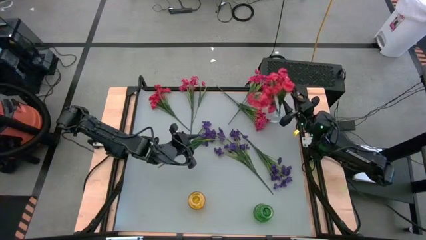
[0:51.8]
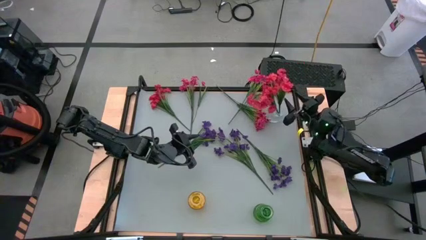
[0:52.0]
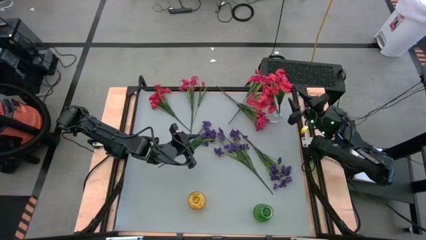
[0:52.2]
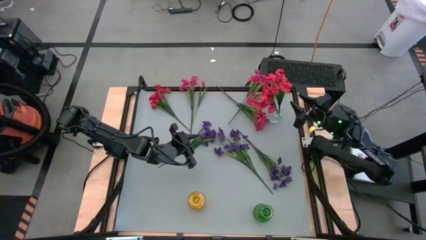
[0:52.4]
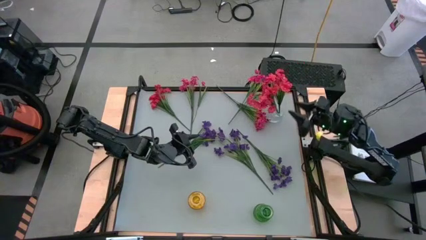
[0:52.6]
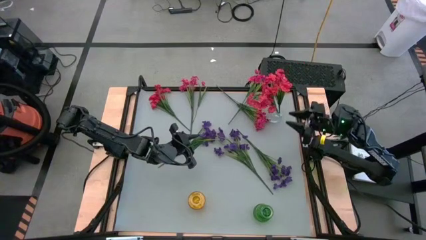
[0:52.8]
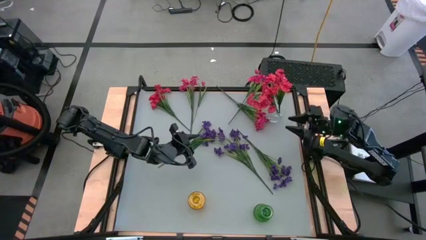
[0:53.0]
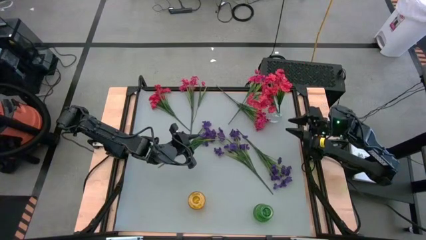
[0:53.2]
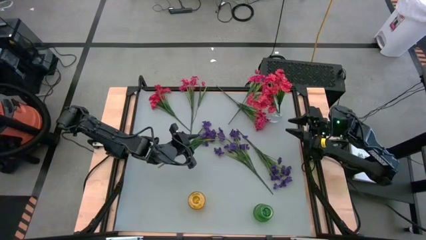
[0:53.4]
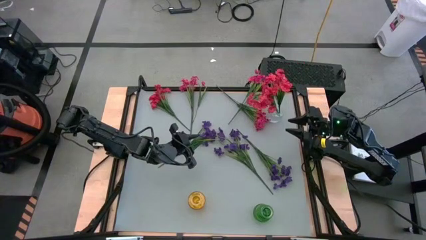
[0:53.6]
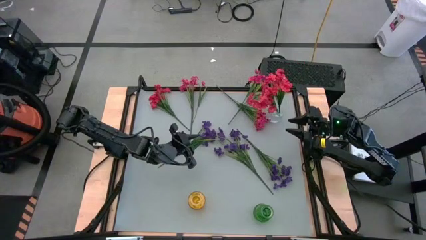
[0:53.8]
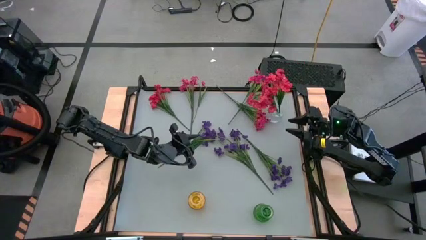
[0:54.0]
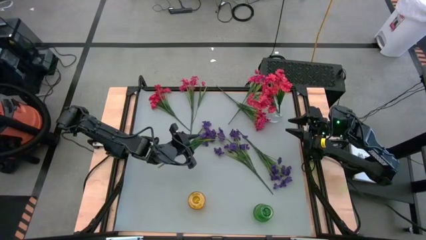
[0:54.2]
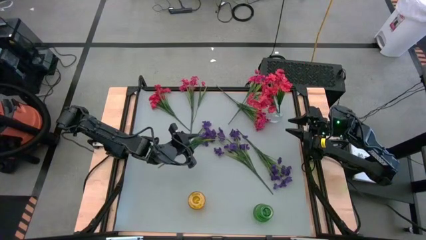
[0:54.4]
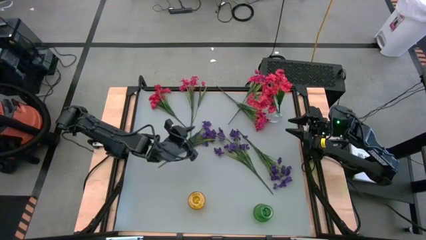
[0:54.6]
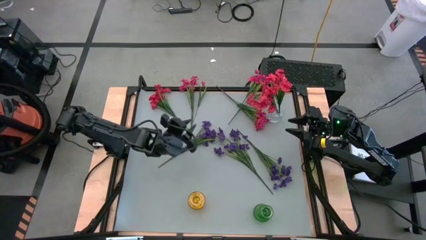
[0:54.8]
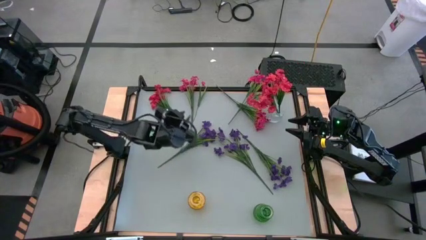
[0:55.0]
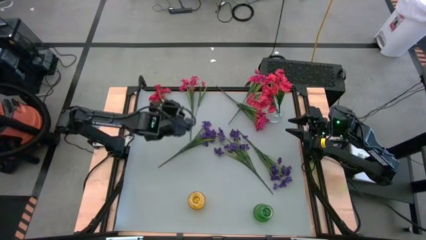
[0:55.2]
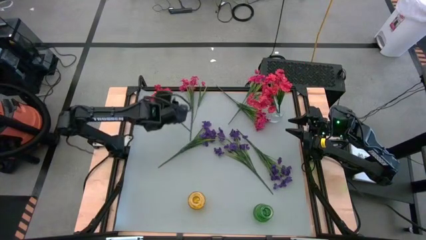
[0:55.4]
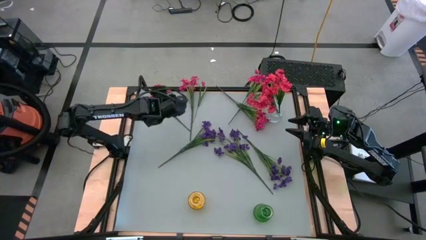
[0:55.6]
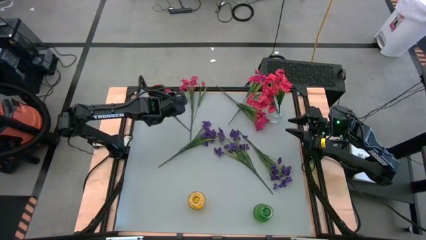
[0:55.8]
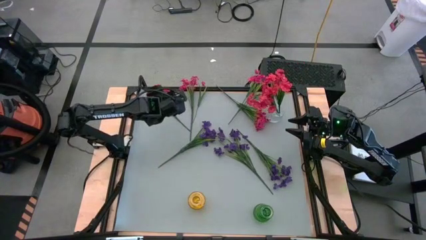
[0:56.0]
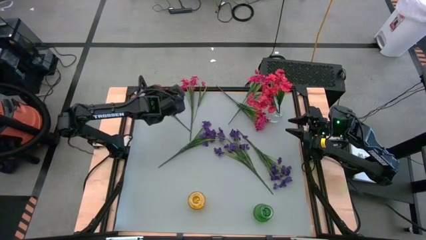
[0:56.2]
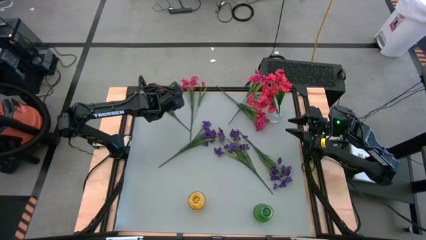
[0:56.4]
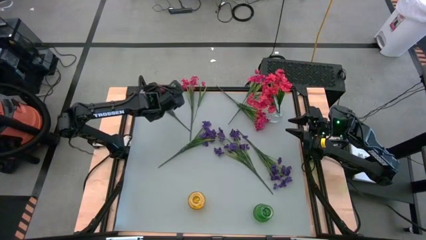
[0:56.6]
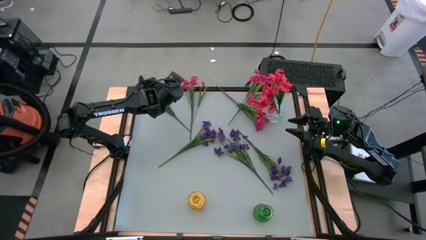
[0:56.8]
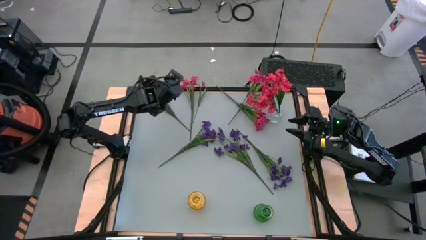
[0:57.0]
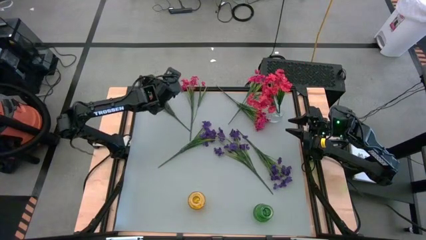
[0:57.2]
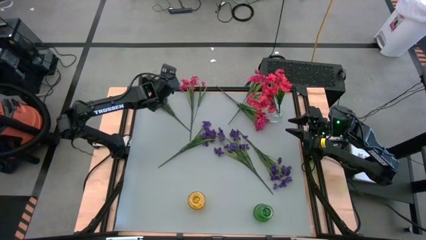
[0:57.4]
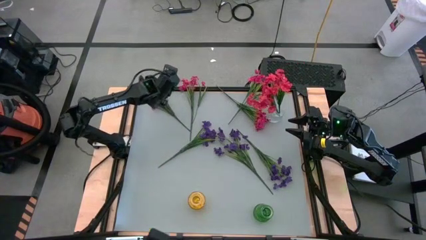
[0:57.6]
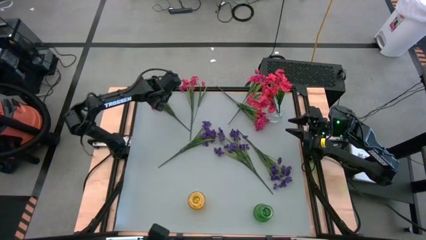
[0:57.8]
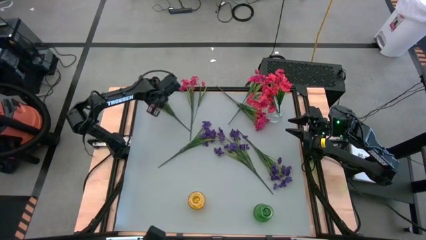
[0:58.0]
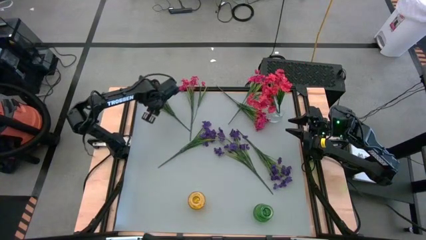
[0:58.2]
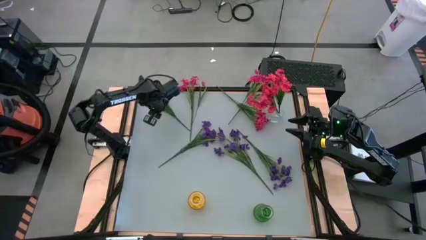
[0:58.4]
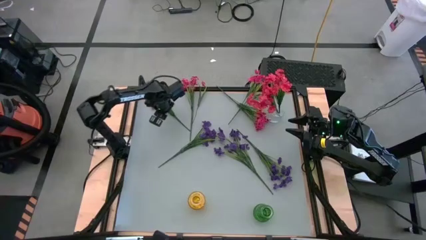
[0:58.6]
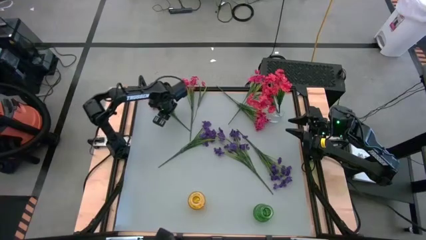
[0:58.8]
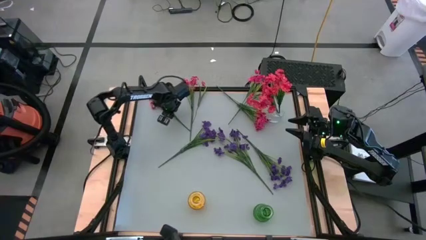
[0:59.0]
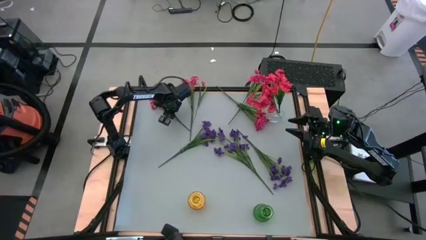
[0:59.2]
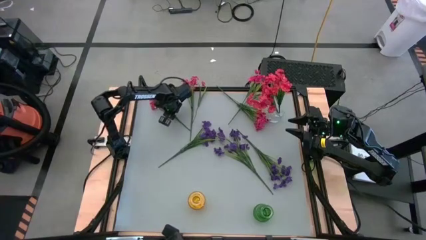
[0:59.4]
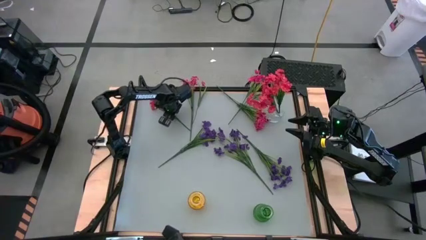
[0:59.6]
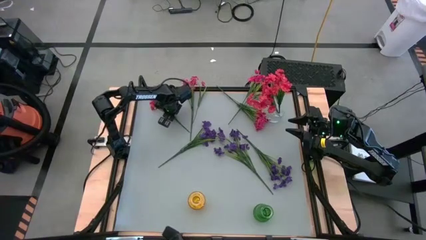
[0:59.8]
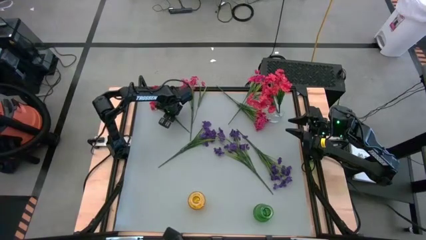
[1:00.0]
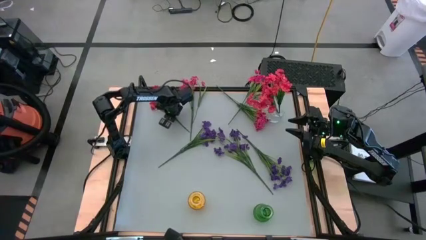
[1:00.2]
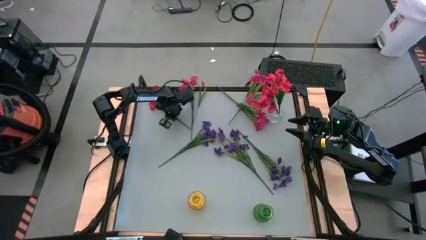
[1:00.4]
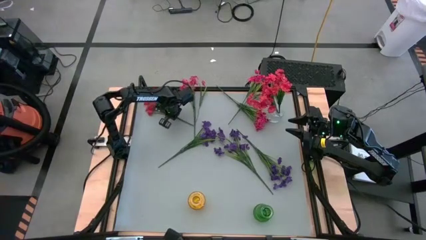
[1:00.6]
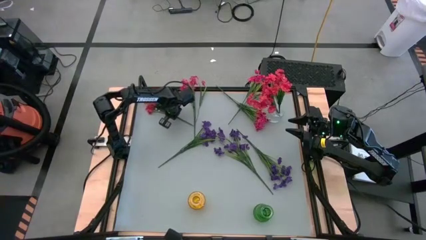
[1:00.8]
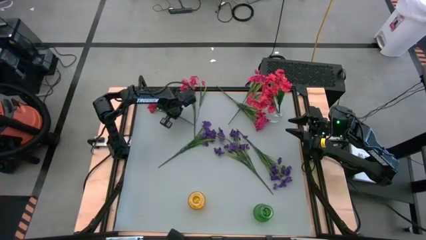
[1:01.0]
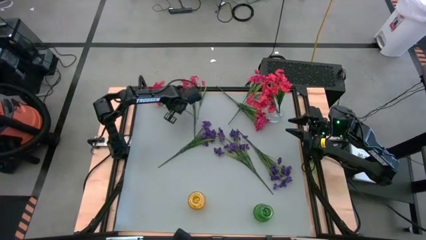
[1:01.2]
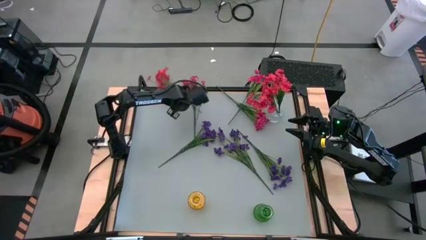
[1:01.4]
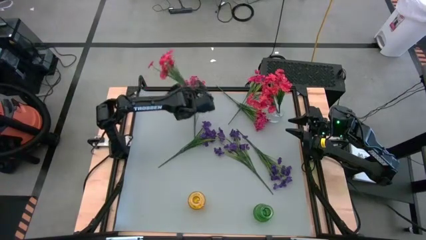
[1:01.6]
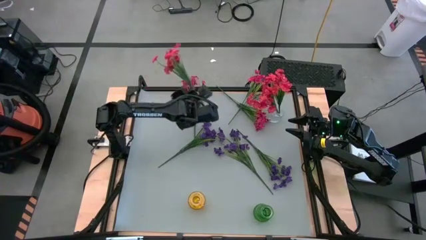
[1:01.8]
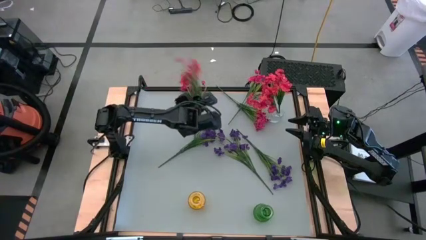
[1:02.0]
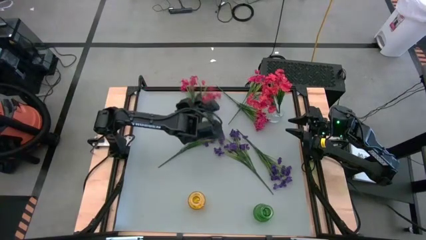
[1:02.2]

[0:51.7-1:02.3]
Task: Sort flowers into vase by color
Put the red flower into the transparent vase

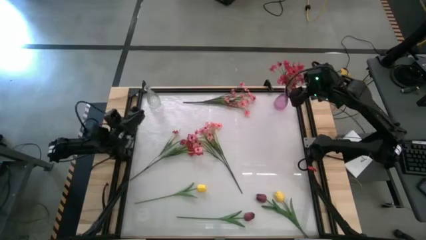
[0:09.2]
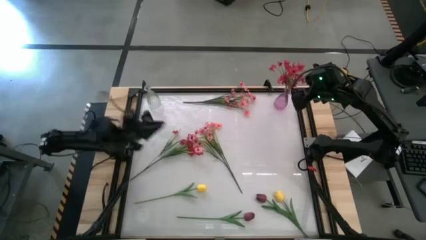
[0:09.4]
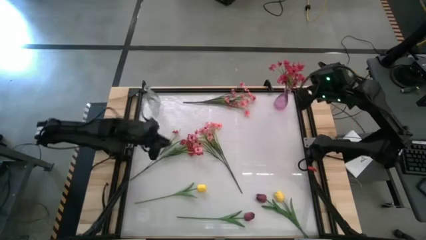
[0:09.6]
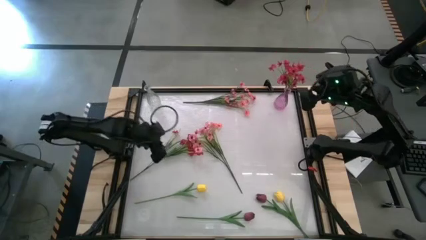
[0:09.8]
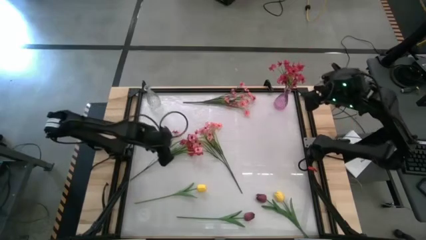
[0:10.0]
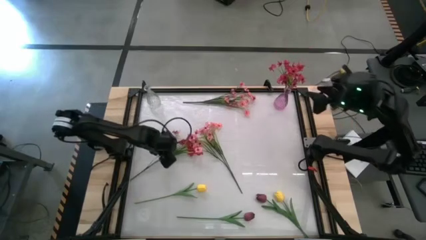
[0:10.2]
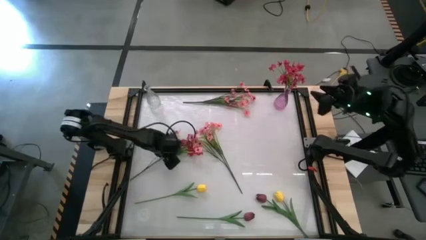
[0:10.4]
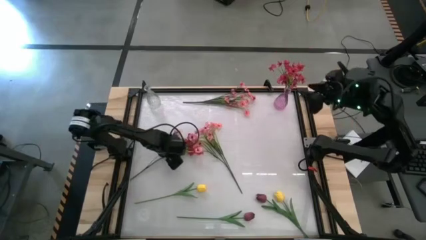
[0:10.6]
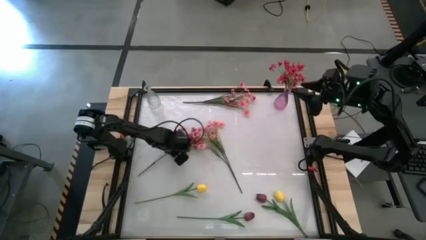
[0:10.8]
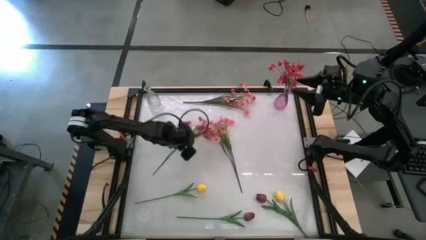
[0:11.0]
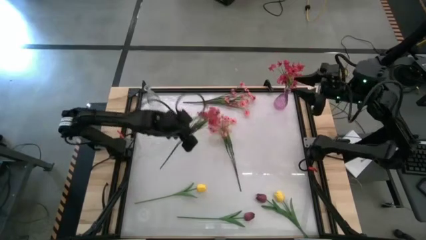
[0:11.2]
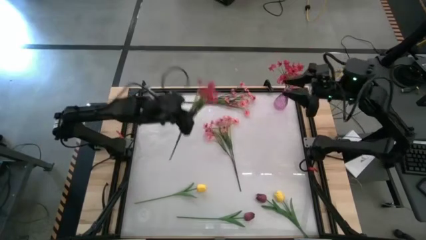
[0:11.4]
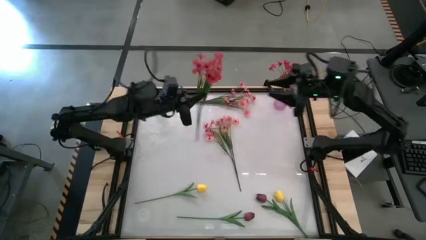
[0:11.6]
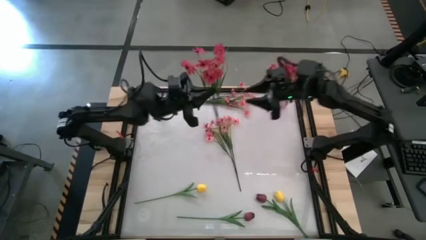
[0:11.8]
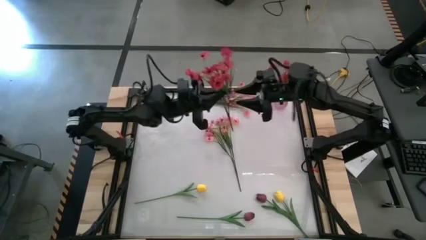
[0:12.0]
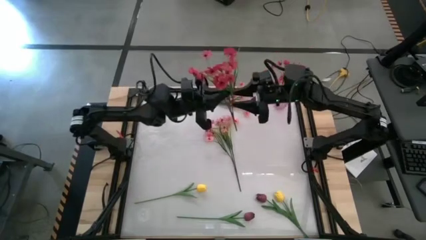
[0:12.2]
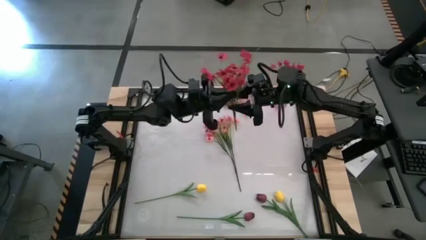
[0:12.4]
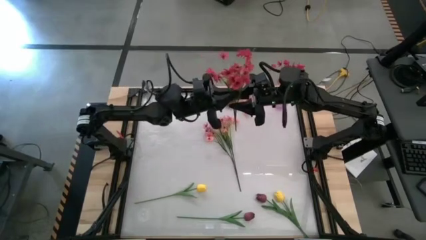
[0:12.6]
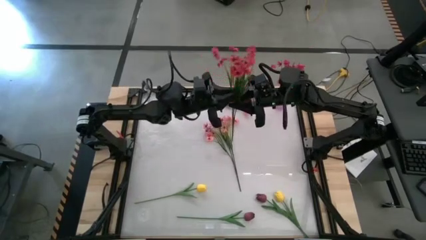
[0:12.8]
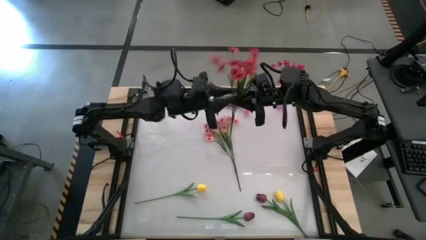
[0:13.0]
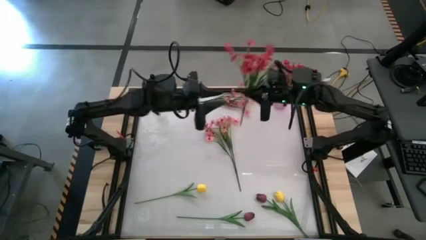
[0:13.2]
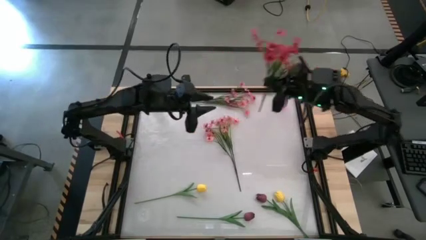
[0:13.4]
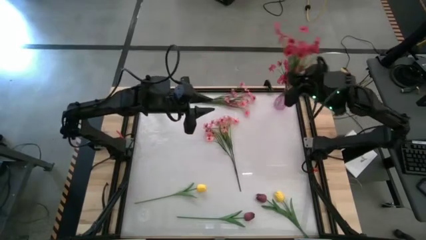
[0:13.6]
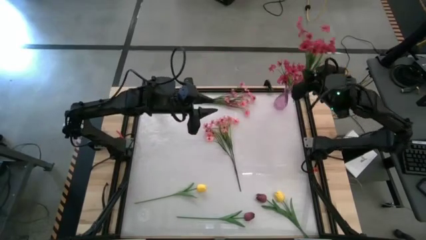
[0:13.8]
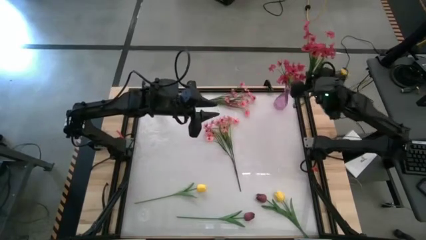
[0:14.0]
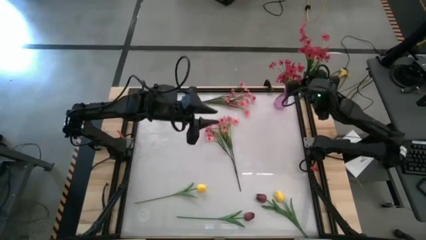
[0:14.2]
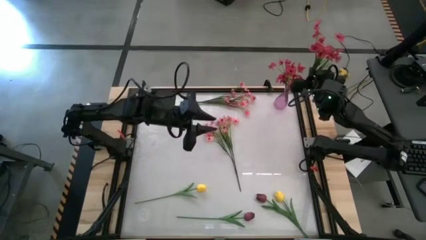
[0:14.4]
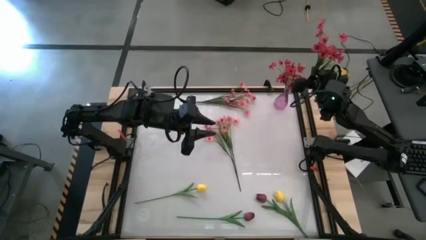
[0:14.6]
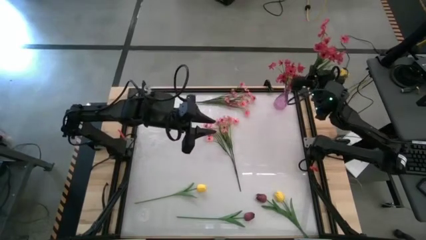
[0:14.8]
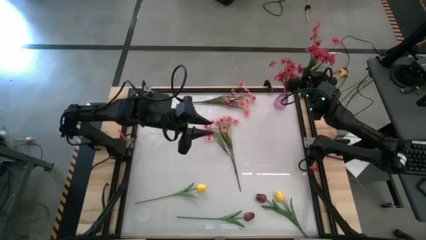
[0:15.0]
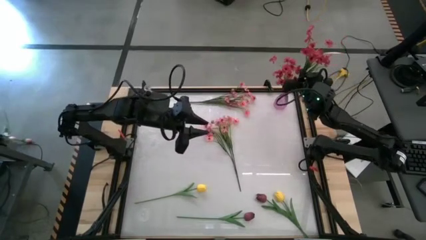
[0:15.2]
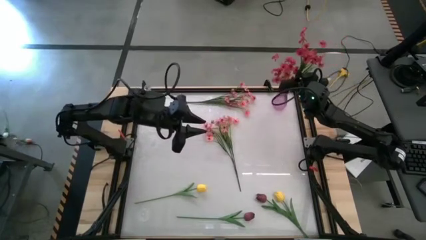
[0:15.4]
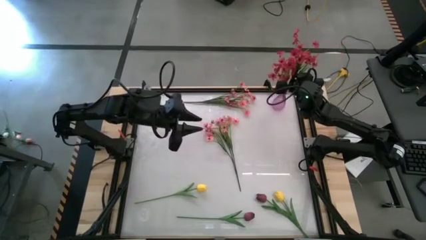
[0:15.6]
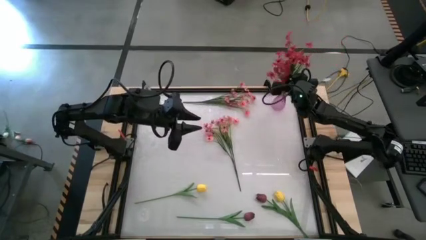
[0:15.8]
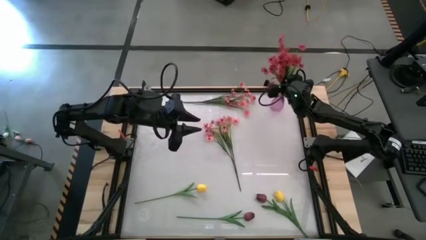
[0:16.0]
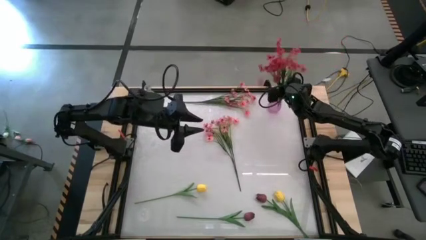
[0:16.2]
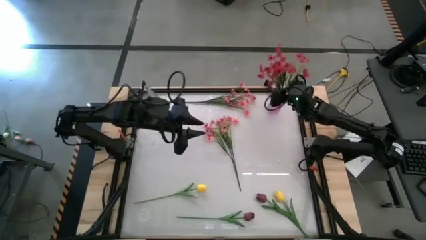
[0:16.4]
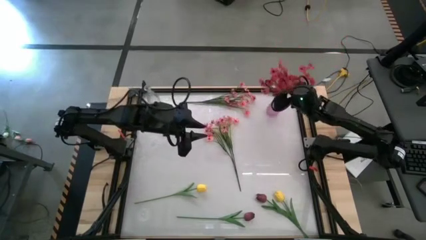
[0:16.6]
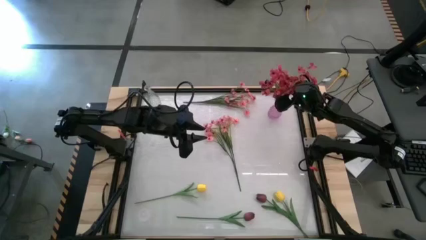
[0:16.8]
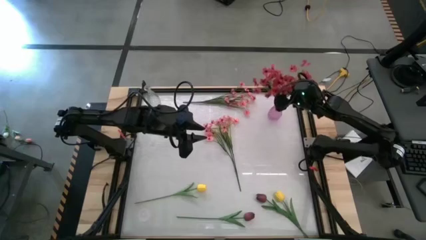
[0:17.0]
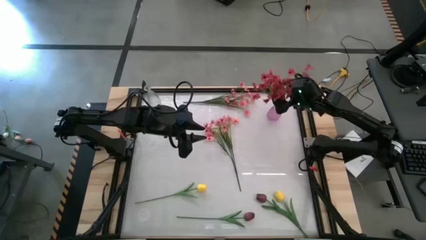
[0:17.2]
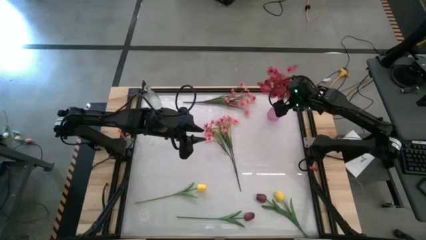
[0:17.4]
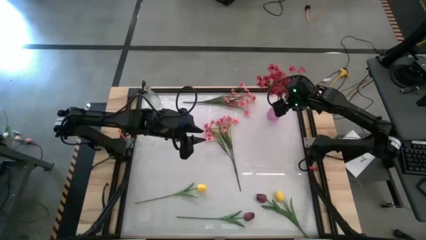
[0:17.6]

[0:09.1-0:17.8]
Task: Sort flowers into vase by color
Put the left pink flowers into the pink vase
